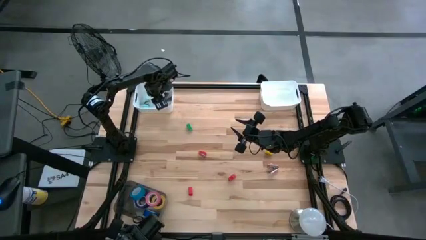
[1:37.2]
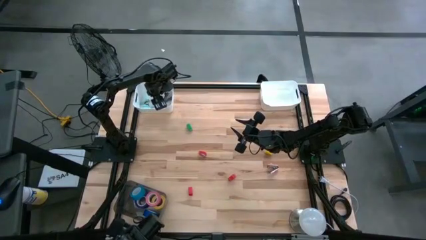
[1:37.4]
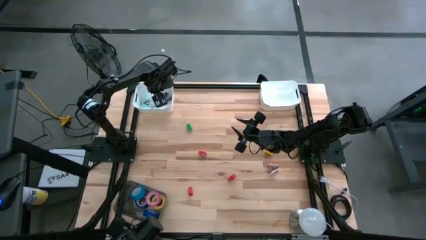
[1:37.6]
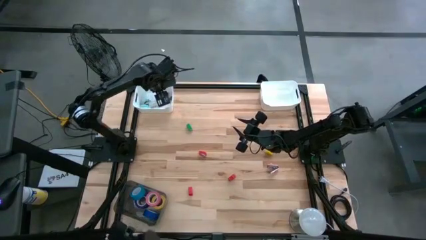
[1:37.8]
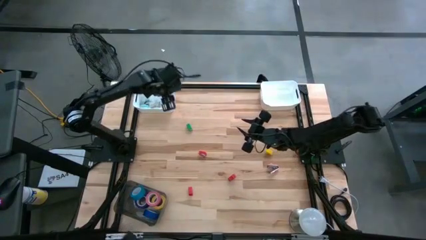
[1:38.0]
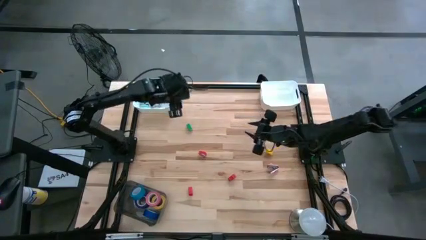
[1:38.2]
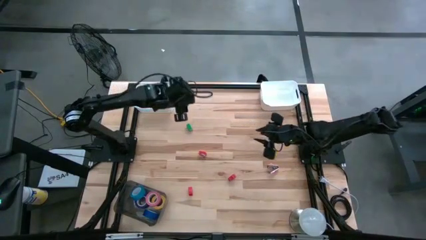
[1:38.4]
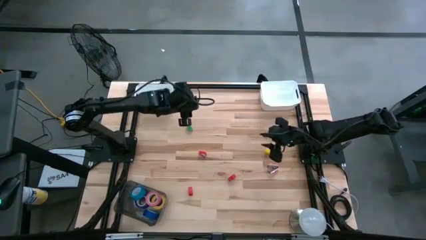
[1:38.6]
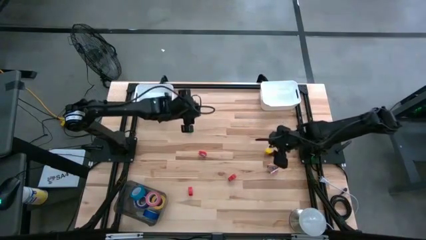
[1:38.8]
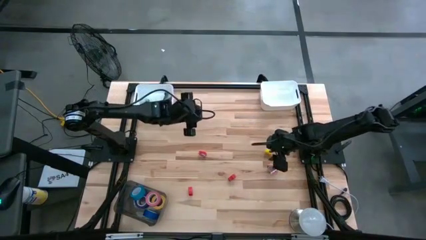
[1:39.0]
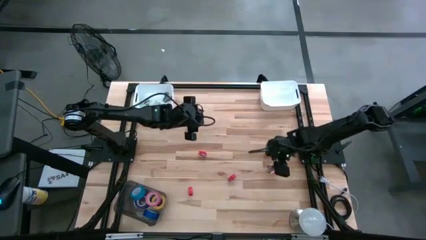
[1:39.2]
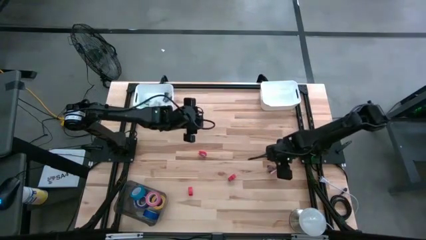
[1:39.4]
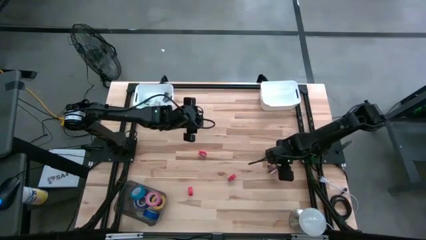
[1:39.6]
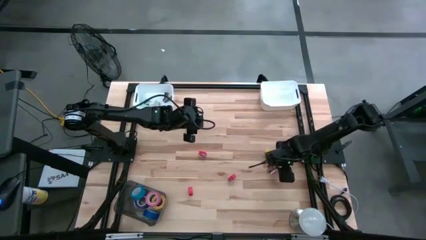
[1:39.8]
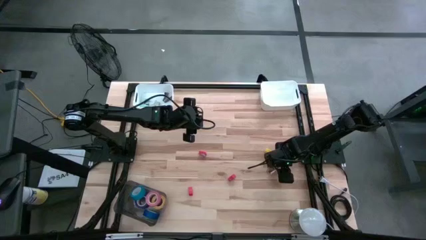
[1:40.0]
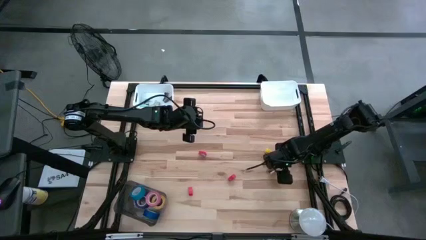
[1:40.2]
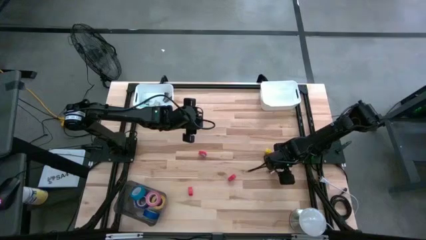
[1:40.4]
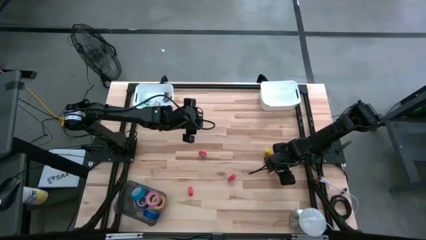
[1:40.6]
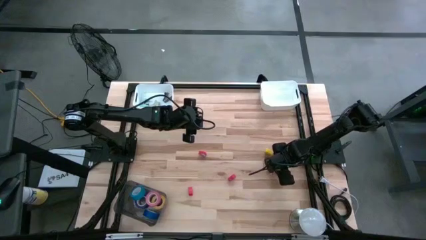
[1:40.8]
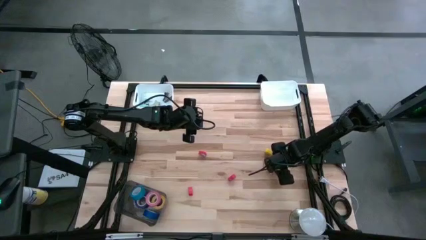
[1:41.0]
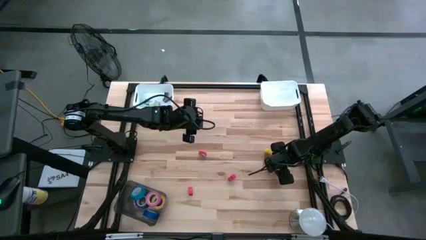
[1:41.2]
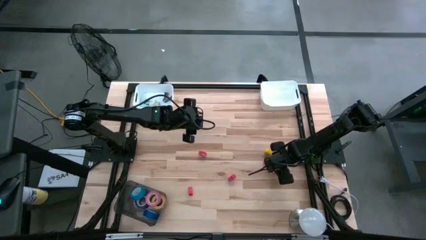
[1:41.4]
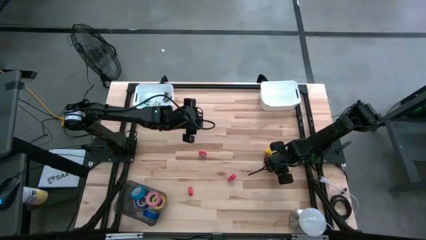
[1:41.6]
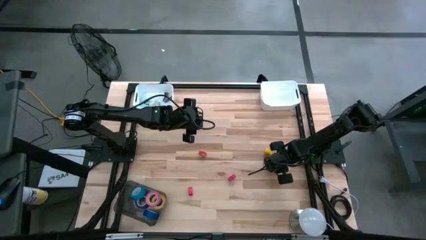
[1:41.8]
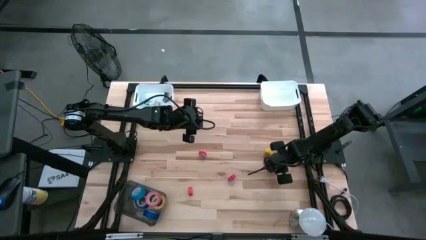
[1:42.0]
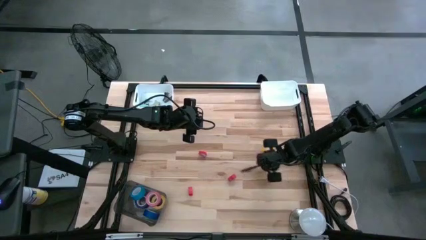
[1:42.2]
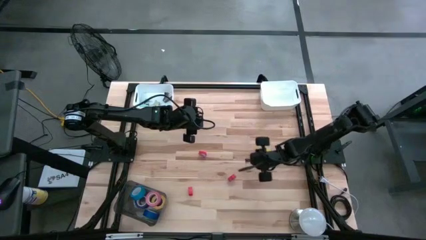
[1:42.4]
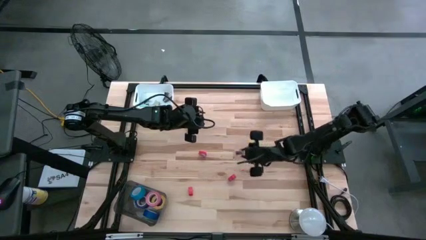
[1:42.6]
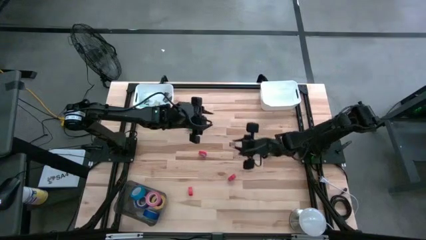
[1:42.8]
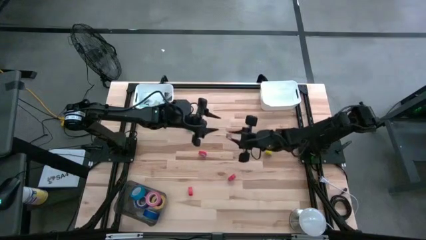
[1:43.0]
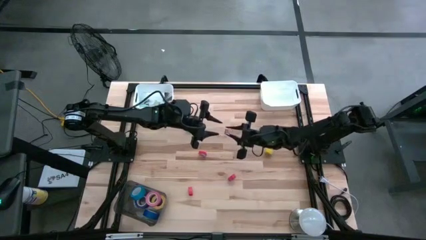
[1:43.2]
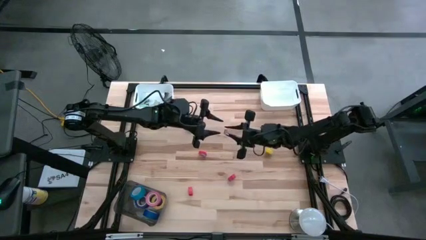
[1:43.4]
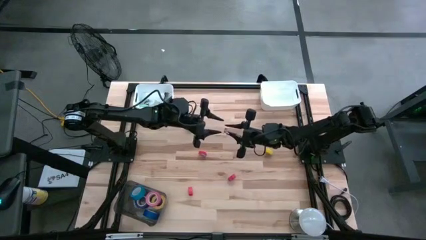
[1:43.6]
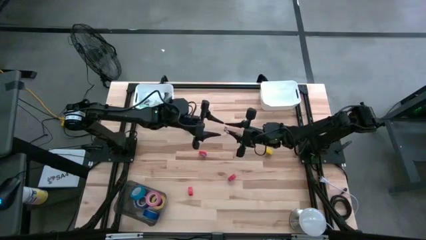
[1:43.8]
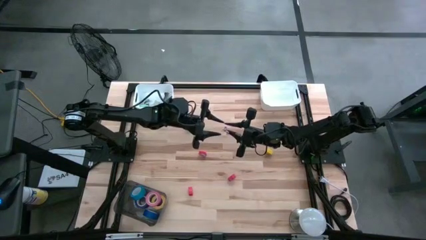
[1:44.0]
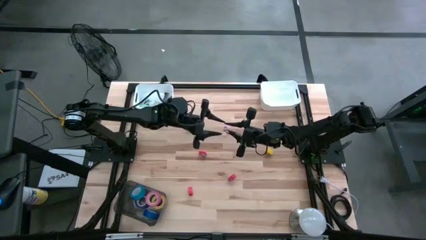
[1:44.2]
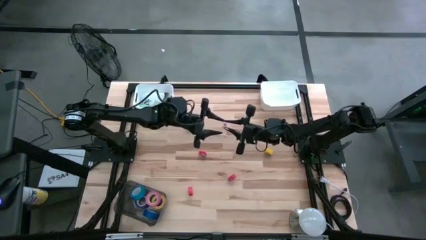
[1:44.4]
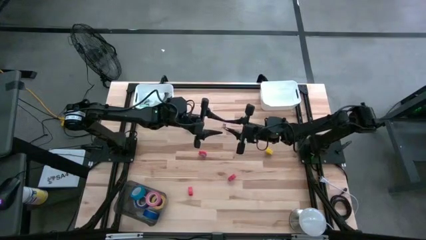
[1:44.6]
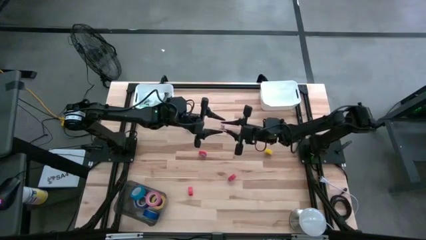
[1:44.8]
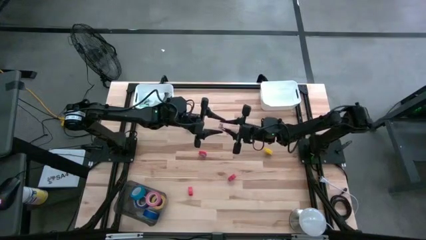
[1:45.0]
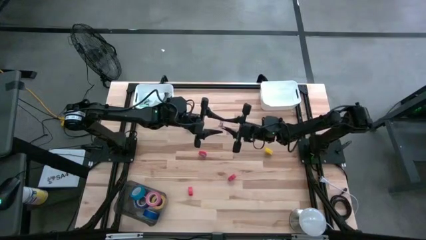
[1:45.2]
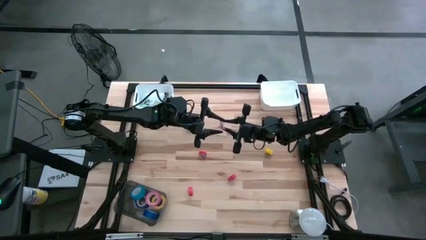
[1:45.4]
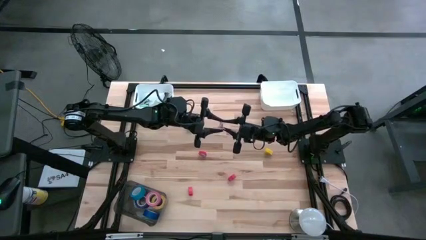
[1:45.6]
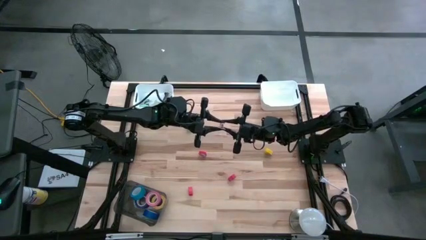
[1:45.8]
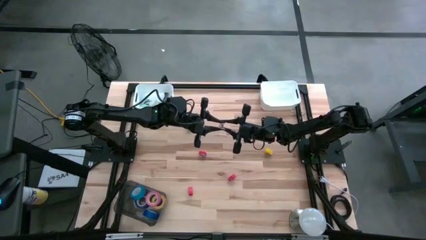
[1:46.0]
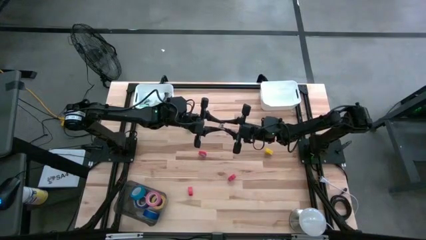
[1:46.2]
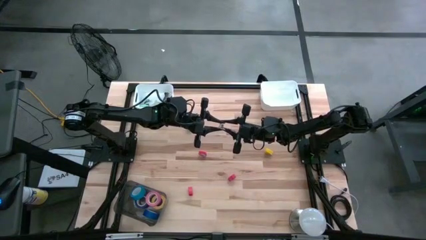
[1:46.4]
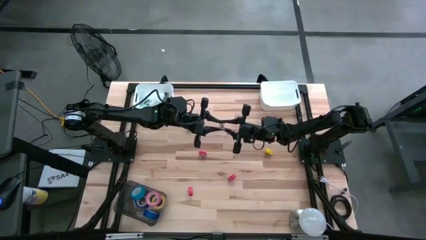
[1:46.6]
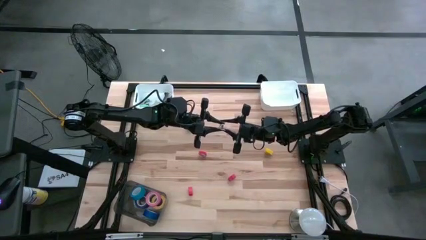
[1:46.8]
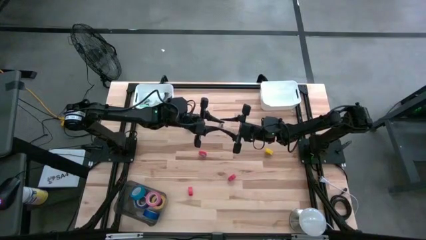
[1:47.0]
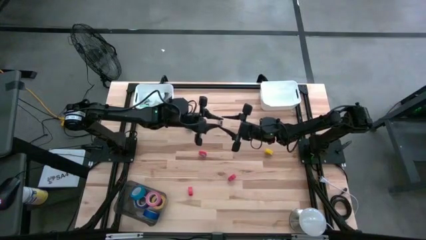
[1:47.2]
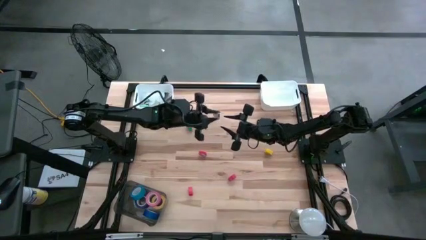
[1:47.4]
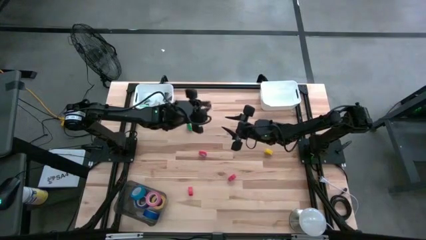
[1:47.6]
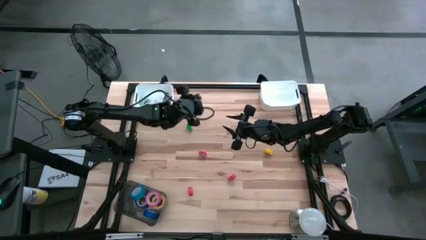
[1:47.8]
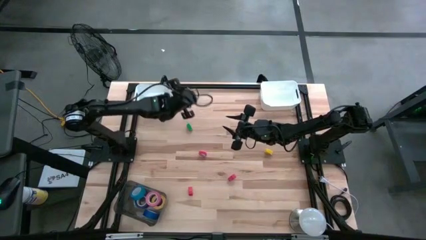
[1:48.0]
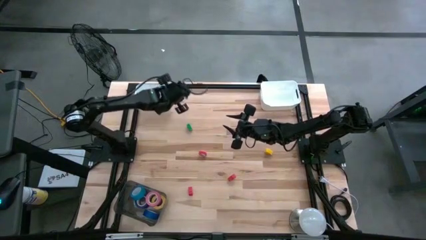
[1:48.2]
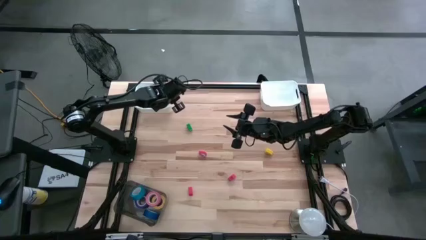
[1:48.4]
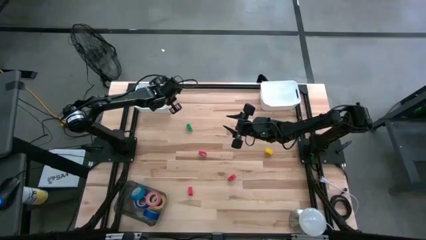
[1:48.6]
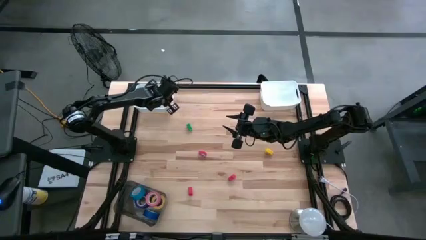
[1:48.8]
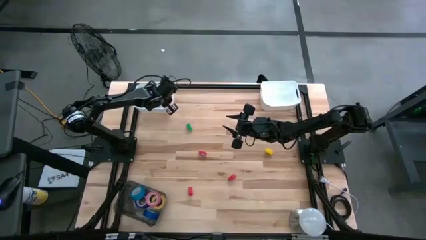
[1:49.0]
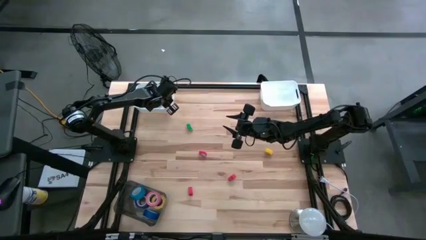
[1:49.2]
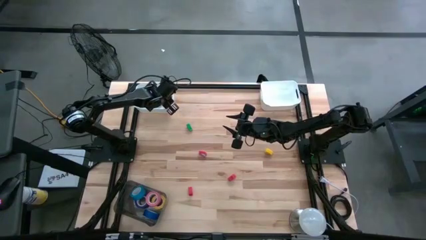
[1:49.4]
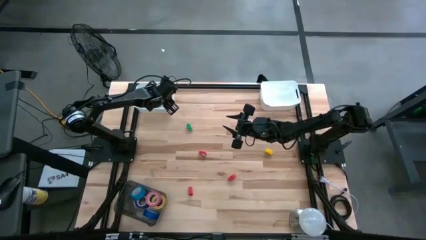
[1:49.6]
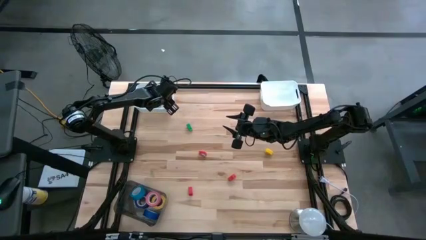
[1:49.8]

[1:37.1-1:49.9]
Task: Pick and place Stapler, Stapler remover, tape
Put the pink staple remover into the left white bin

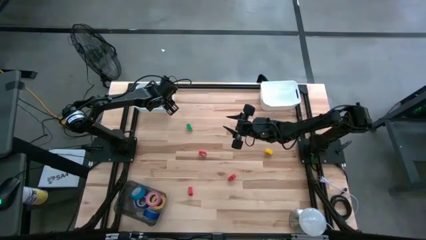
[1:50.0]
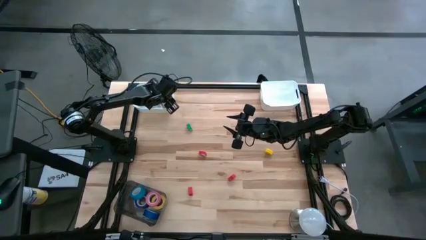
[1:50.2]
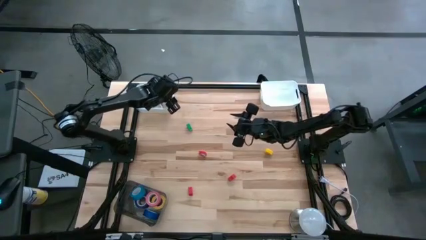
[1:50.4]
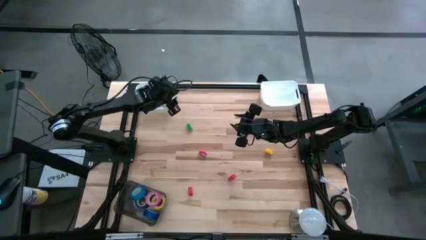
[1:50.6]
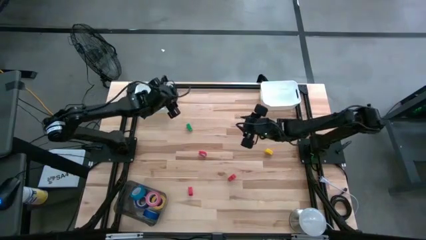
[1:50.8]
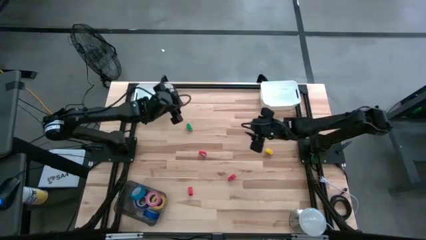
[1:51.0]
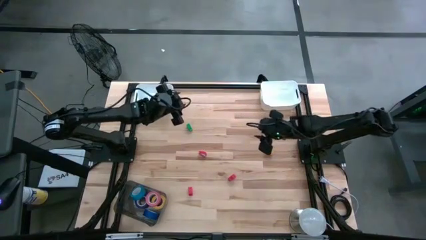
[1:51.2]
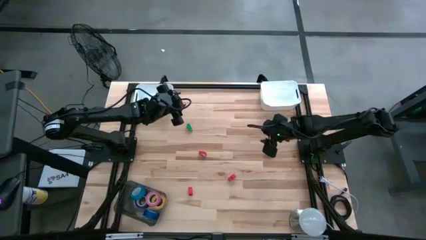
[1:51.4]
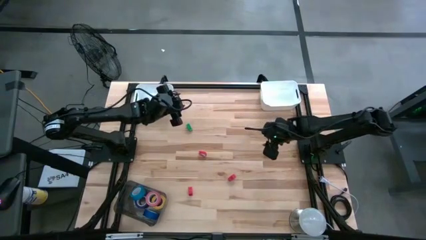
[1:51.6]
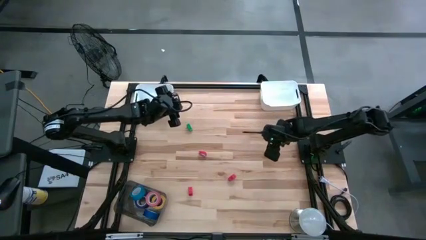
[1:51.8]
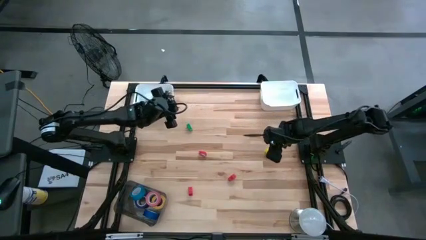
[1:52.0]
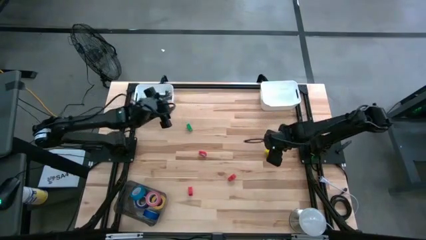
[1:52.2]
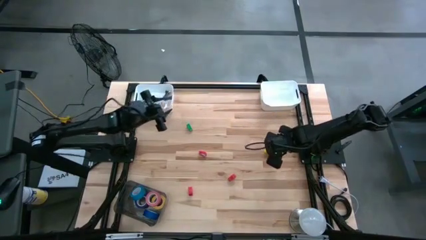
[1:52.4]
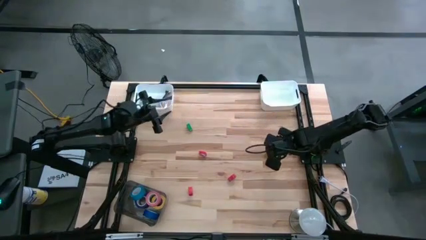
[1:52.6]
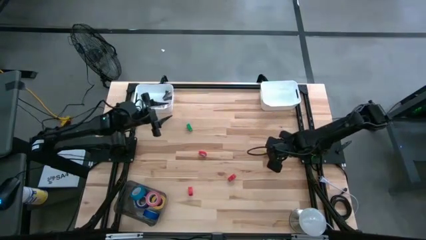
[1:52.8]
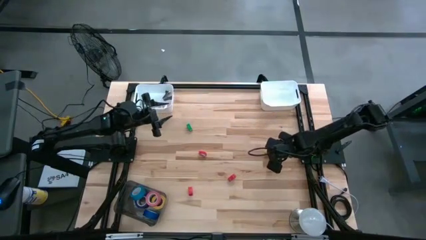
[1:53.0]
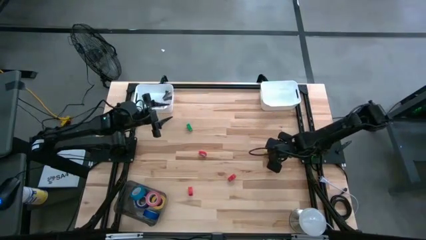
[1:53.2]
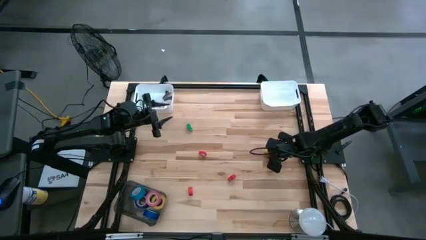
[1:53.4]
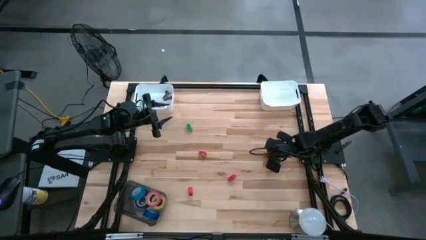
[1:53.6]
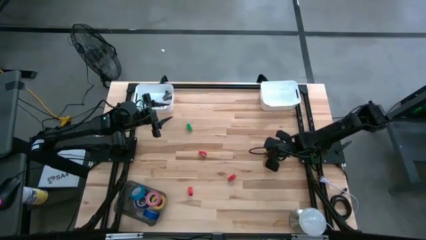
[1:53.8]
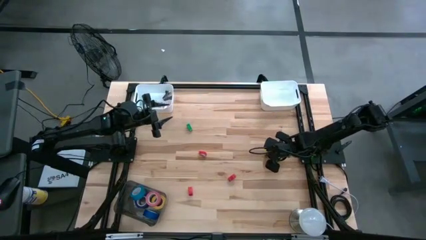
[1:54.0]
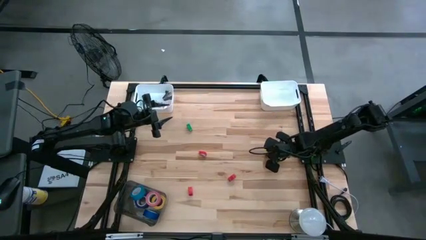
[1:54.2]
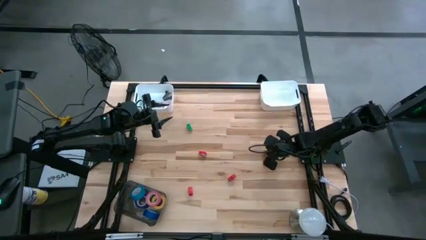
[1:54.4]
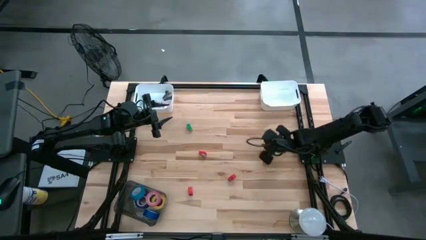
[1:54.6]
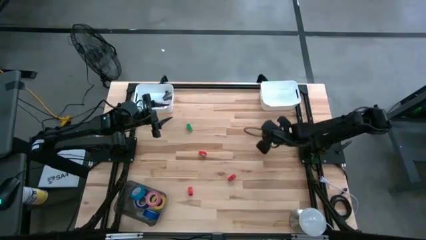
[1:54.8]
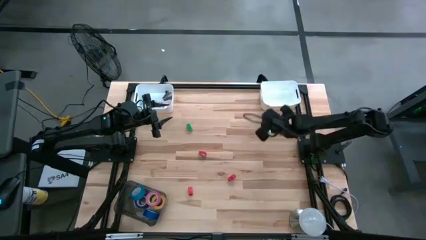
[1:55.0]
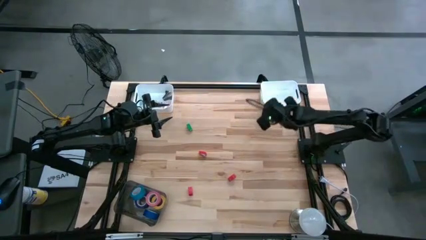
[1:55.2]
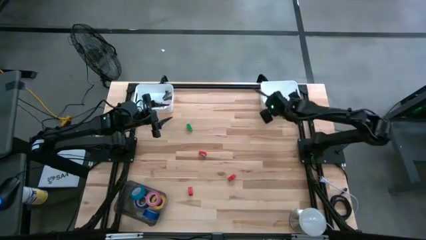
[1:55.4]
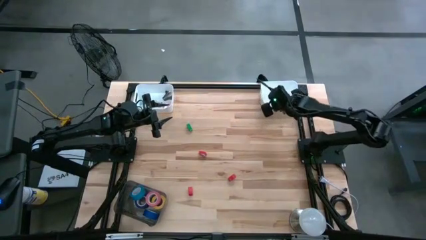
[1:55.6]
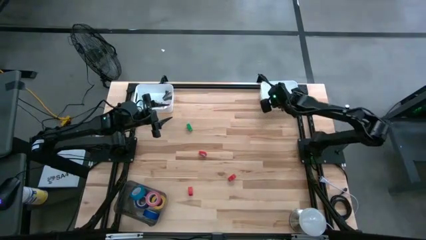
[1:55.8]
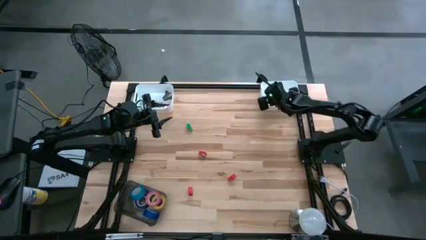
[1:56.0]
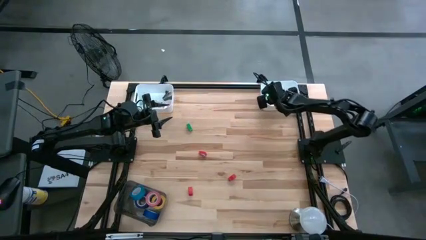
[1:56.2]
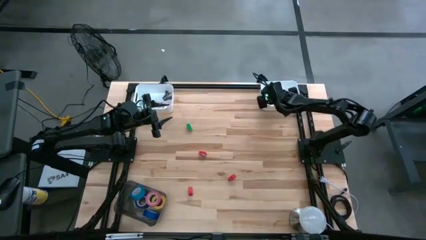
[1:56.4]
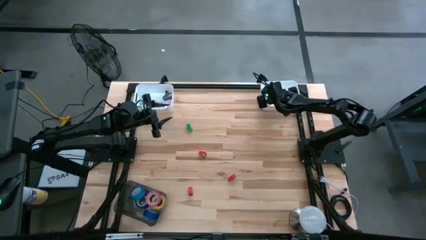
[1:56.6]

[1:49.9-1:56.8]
Put the yellow stapler into the right white bin
